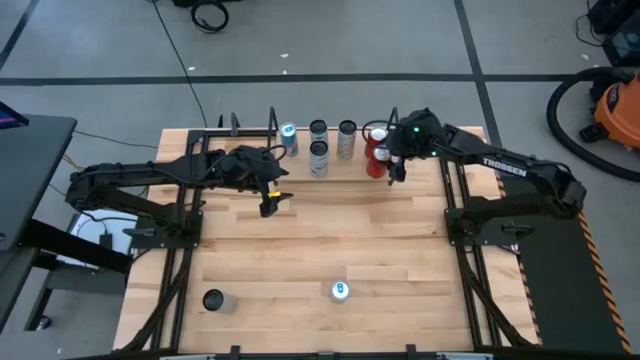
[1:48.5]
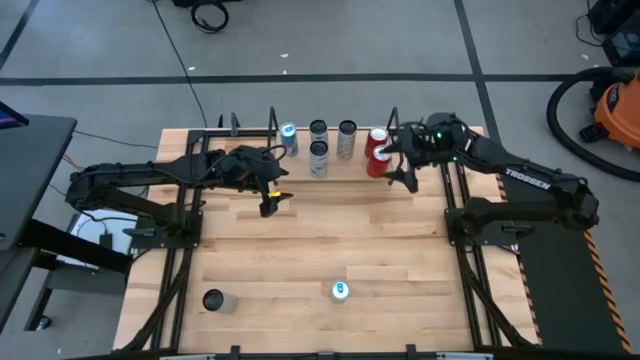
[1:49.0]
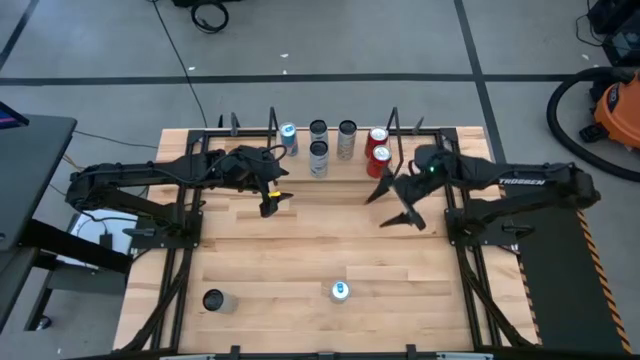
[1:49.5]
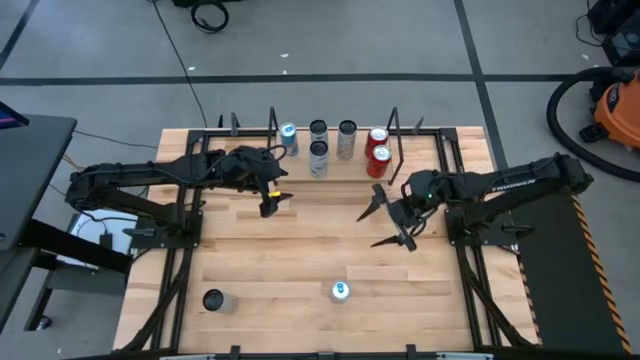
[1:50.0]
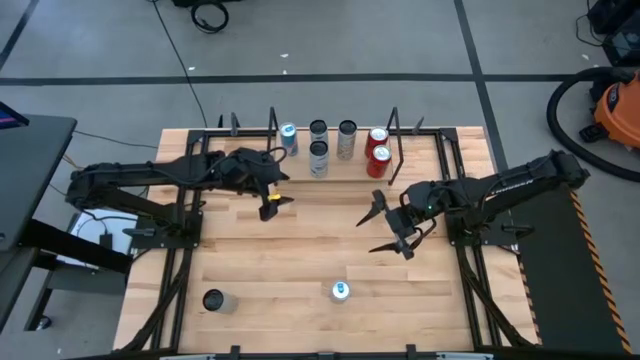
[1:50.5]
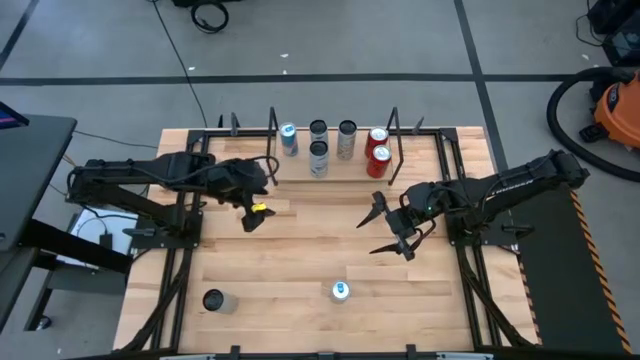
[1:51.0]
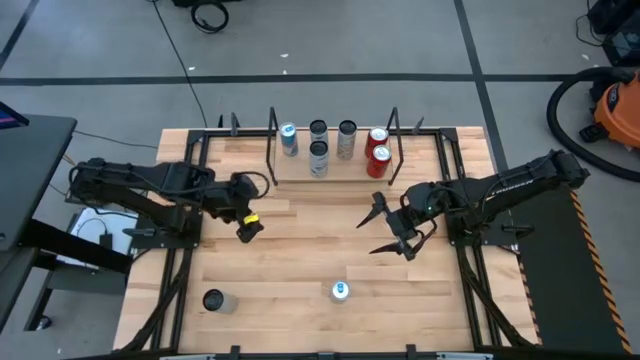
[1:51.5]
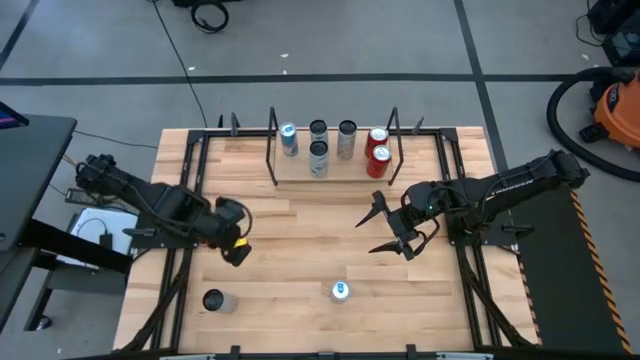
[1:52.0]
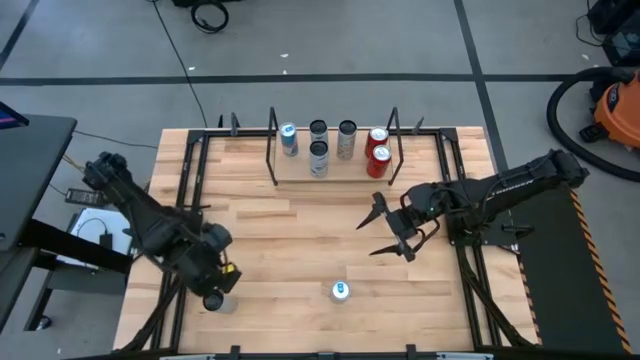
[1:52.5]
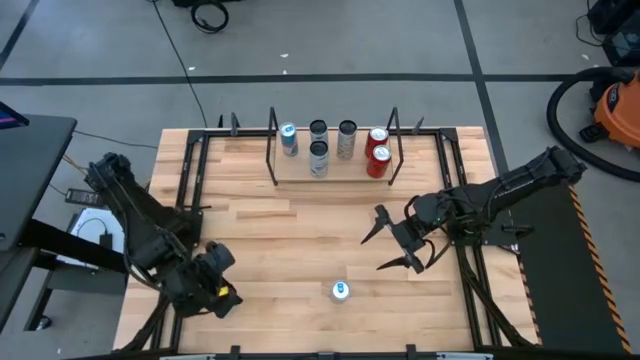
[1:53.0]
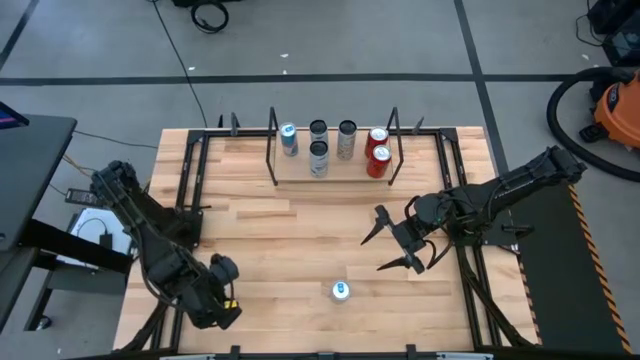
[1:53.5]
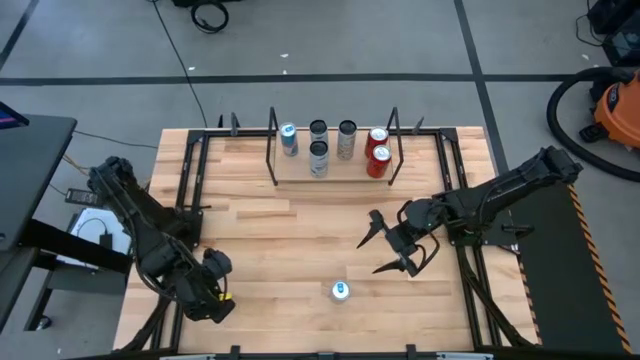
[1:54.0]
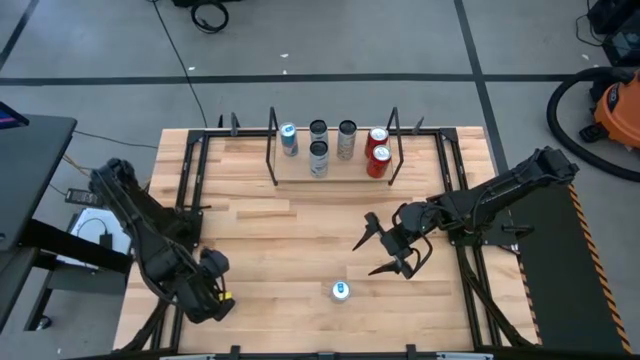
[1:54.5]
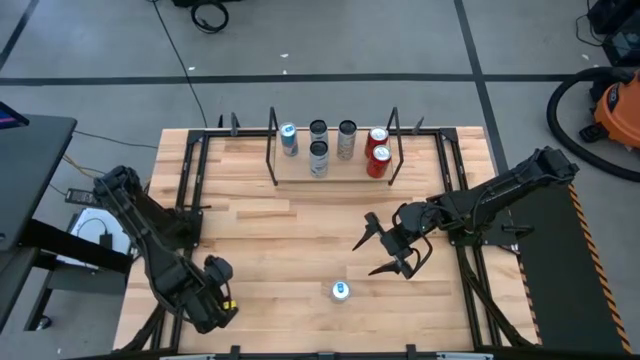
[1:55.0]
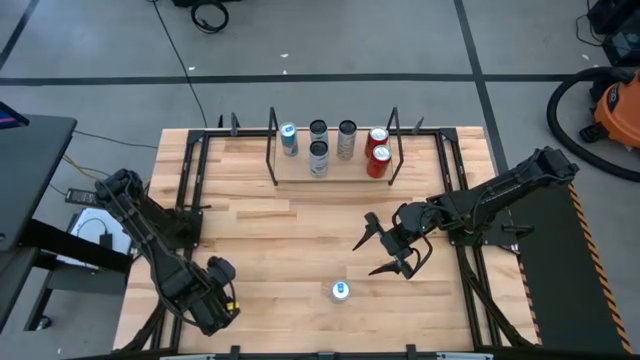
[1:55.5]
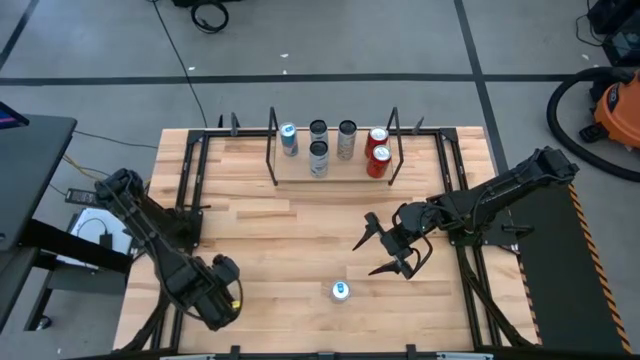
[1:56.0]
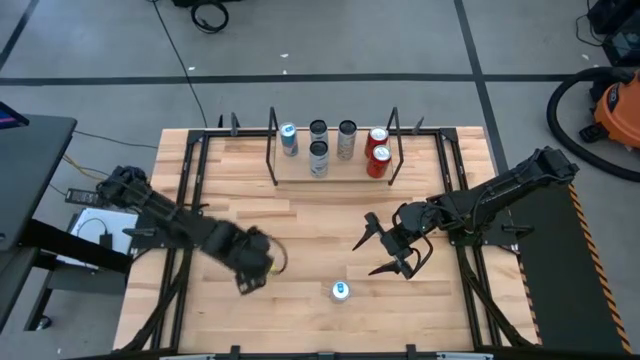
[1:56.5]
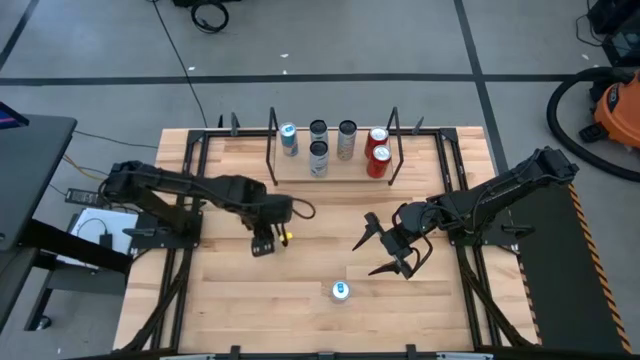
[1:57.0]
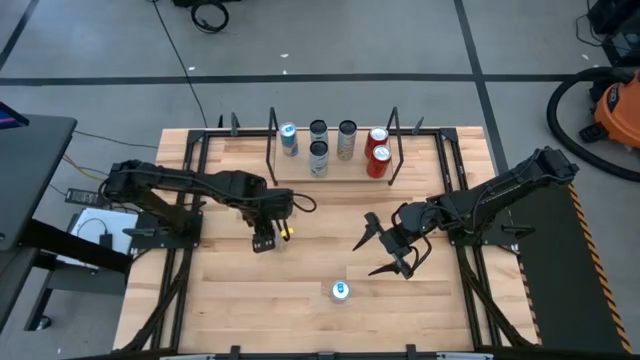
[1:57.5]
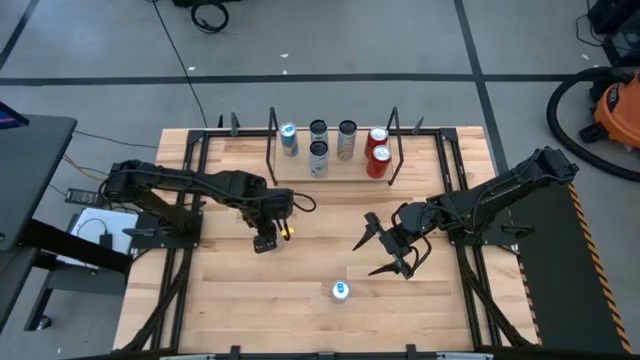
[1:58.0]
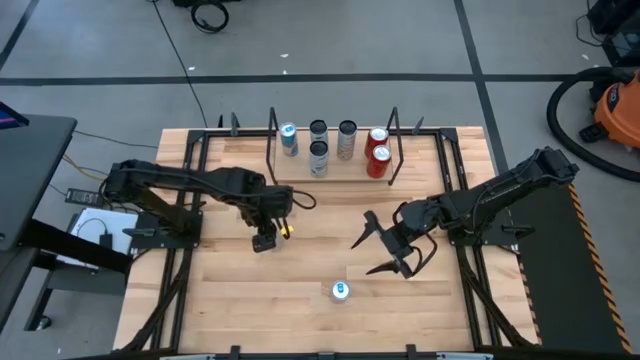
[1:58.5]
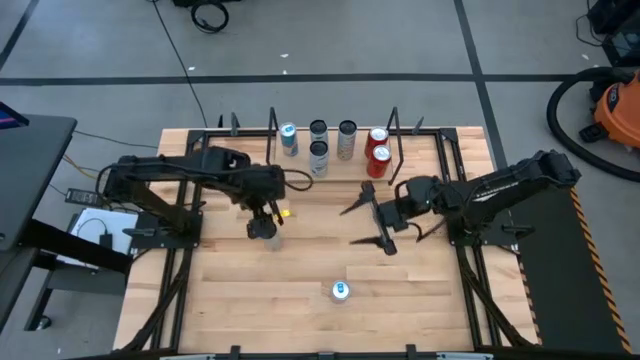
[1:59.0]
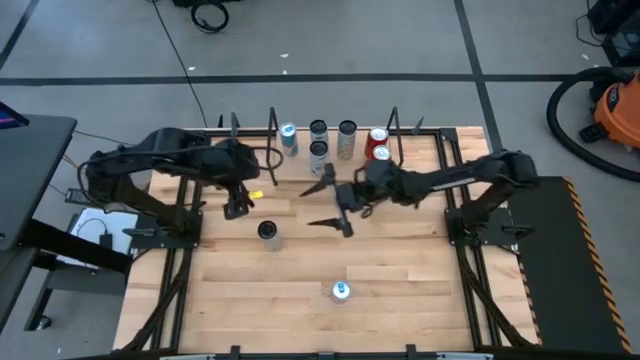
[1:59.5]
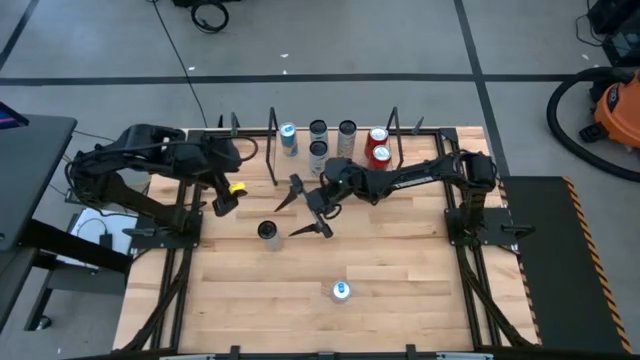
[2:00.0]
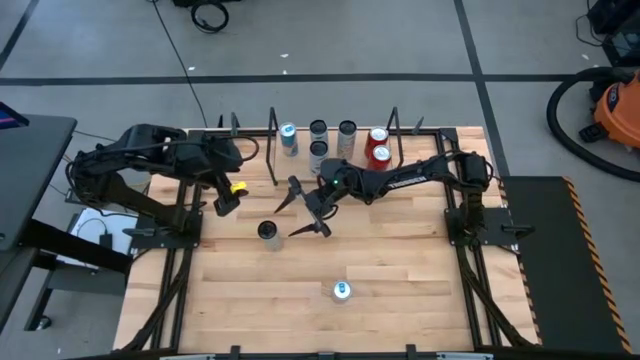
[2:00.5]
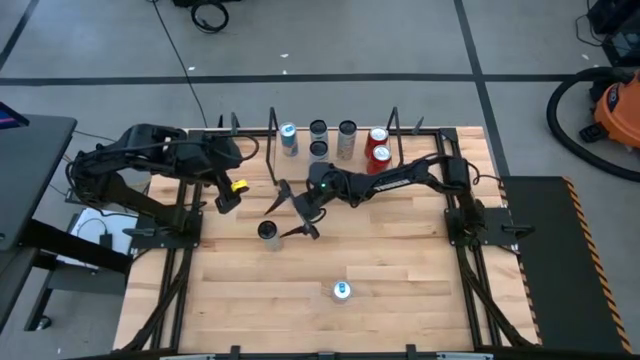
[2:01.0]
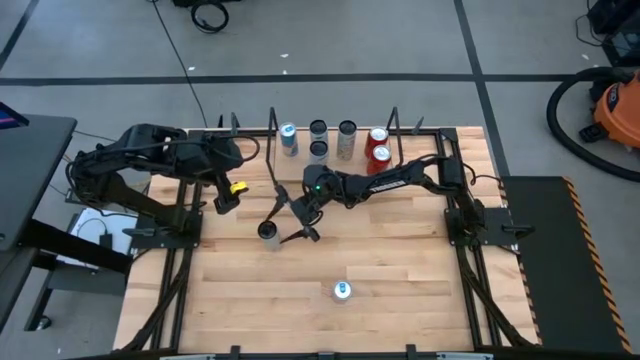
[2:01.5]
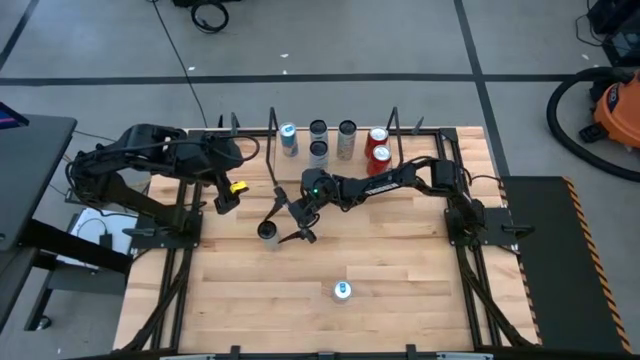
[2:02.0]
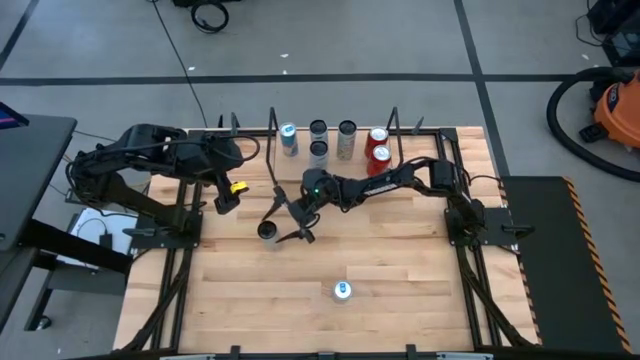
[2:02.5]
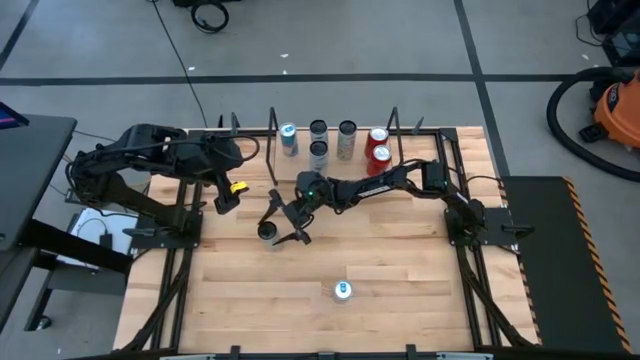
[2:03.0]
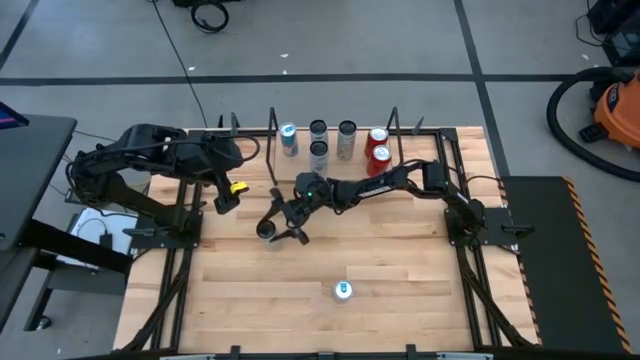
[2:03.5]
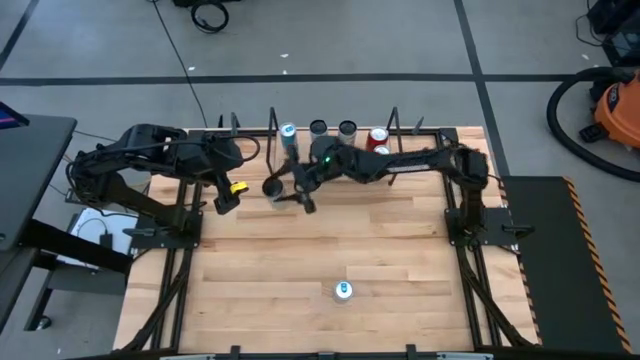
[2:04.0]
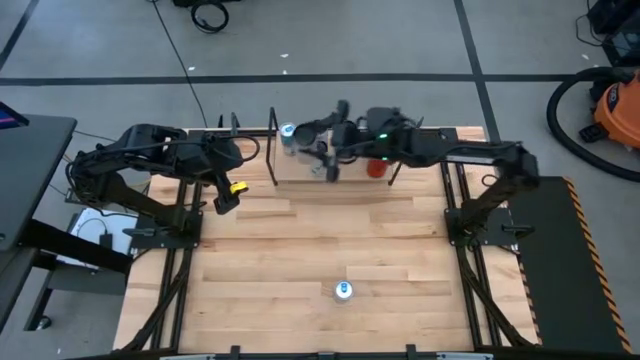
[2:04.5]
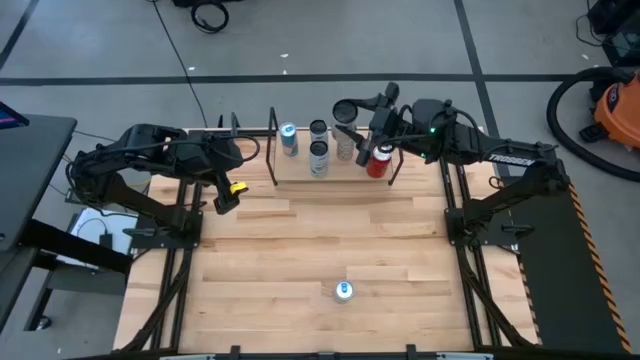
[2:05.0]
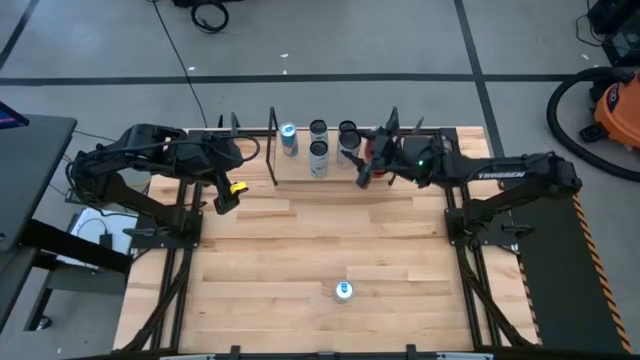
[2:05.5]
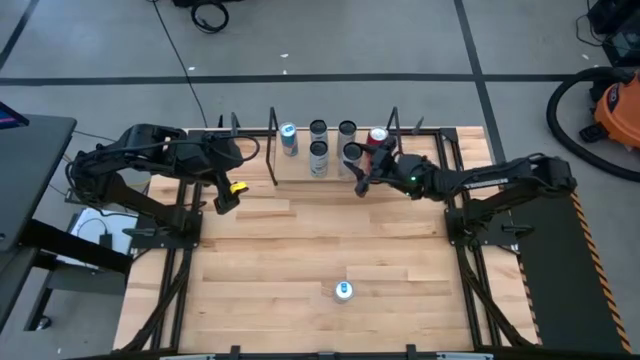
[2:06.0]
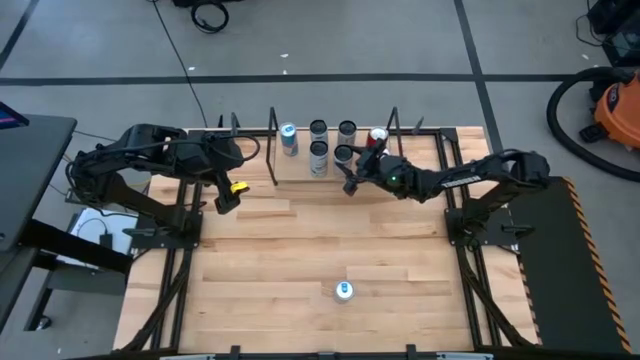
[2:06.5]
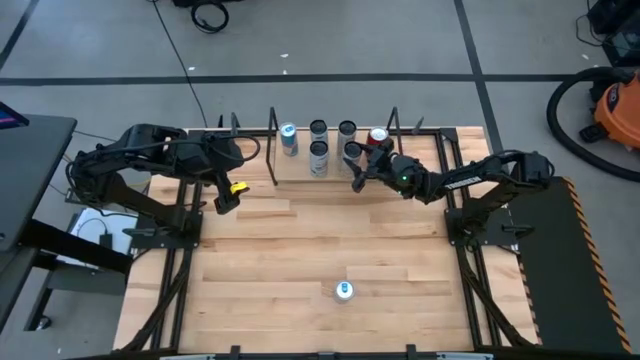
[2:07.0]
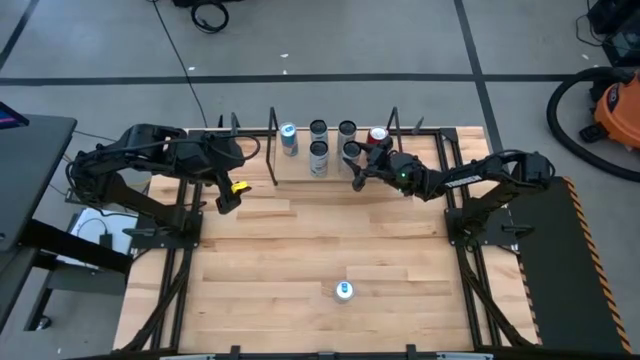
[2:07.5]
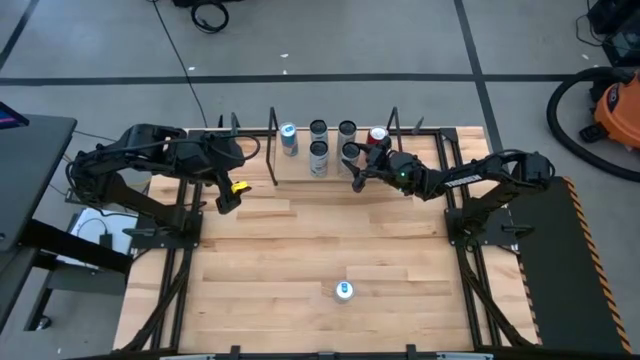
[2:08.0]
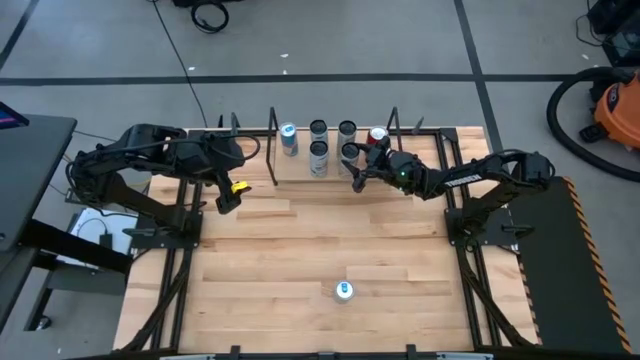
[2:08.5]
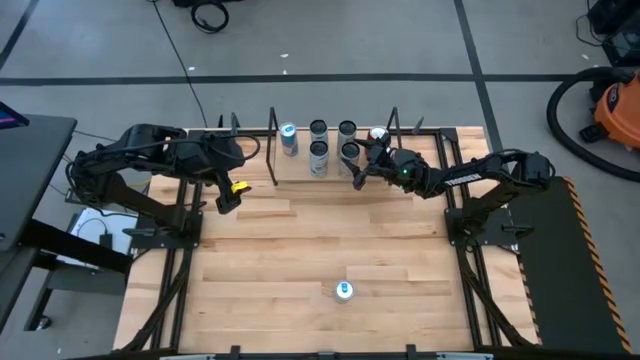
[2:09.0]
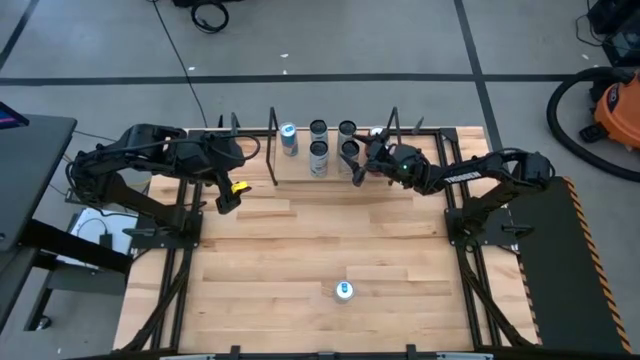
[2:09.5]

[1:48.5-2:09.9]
Task: Place canned beverage on shelf
Put the white-yellow soda can aligned with the other white-yellow soda can on the shelf
